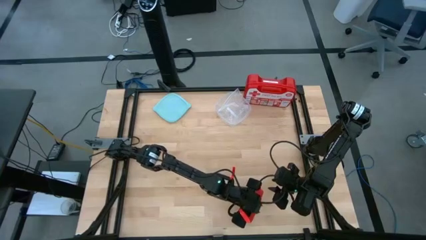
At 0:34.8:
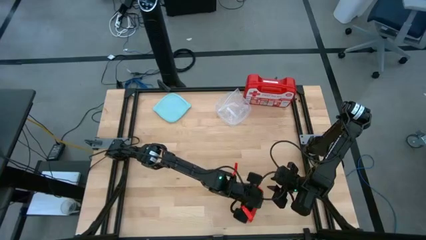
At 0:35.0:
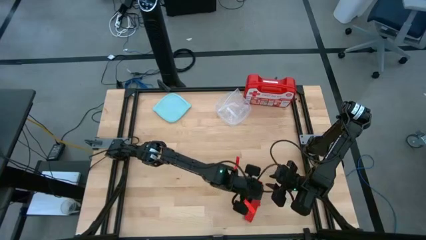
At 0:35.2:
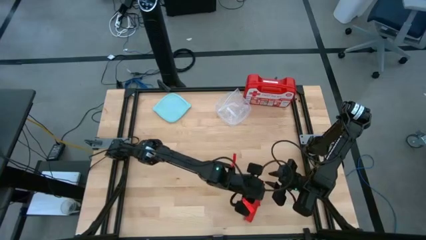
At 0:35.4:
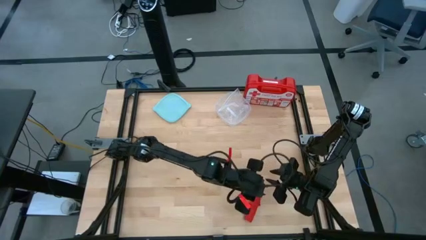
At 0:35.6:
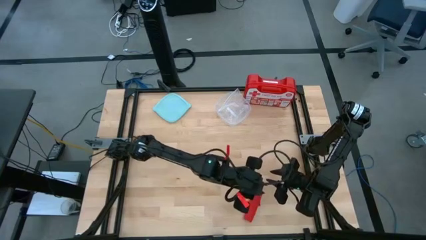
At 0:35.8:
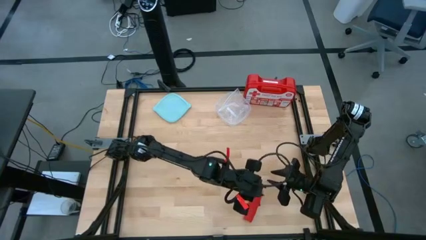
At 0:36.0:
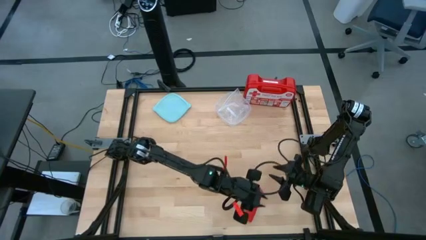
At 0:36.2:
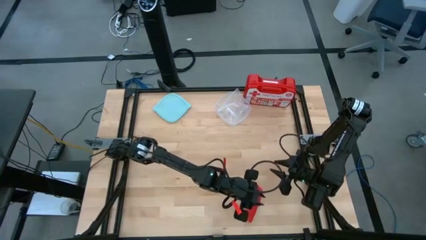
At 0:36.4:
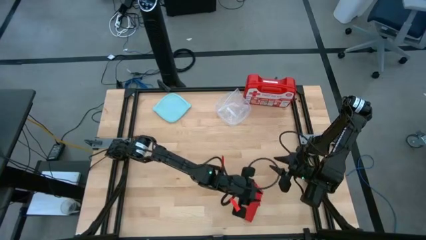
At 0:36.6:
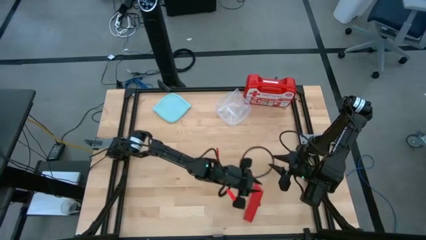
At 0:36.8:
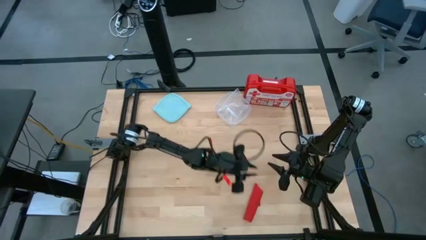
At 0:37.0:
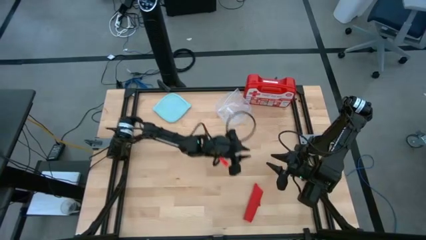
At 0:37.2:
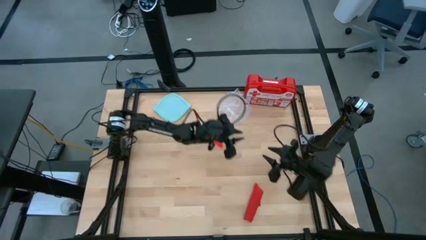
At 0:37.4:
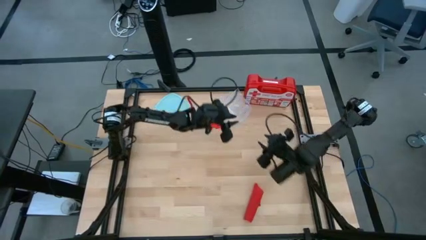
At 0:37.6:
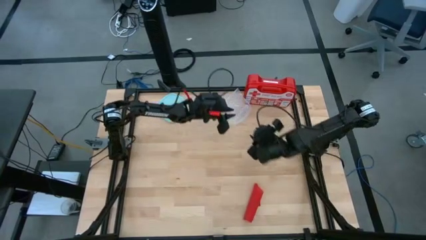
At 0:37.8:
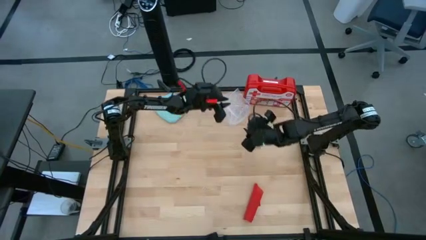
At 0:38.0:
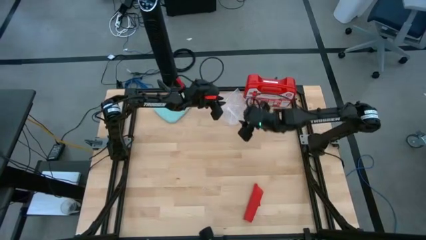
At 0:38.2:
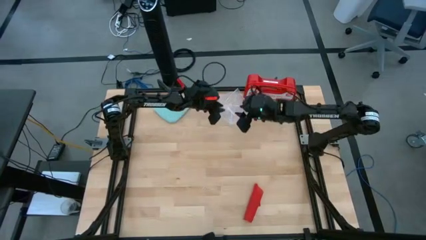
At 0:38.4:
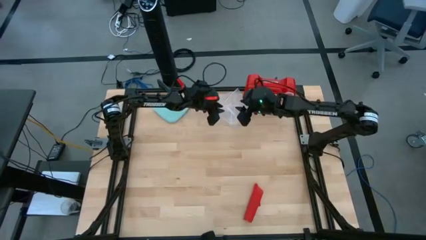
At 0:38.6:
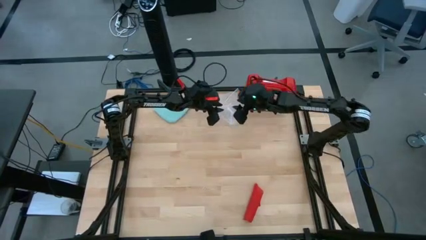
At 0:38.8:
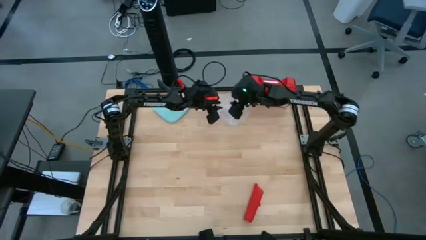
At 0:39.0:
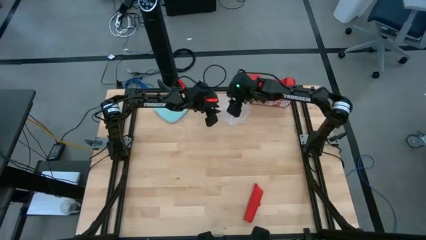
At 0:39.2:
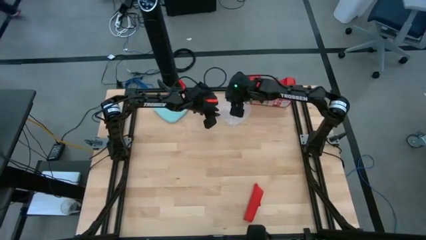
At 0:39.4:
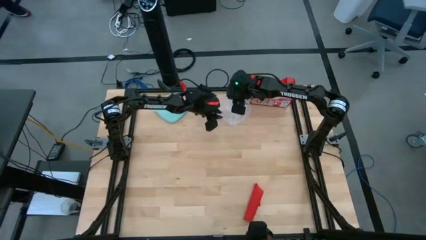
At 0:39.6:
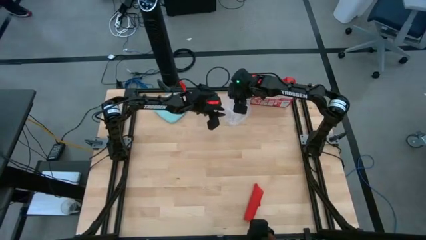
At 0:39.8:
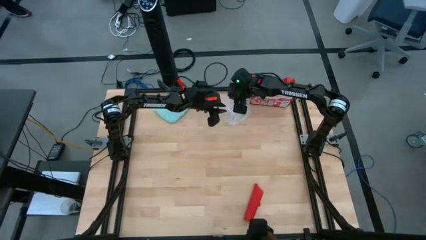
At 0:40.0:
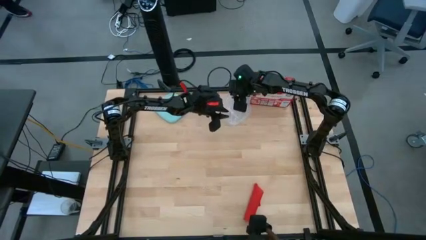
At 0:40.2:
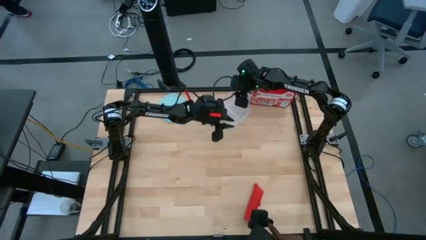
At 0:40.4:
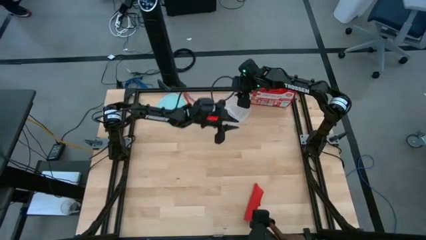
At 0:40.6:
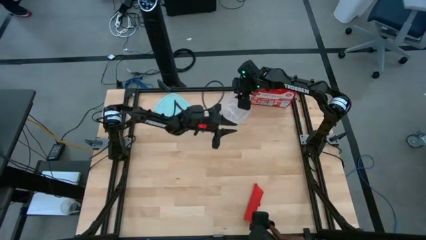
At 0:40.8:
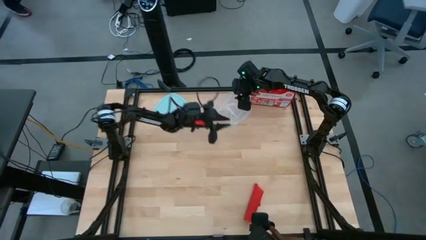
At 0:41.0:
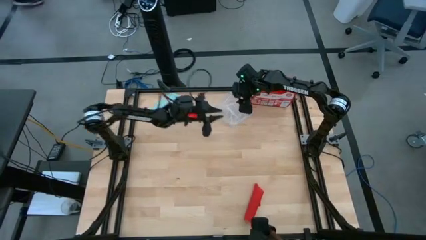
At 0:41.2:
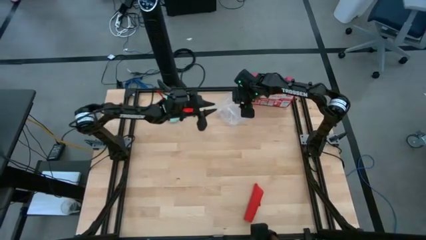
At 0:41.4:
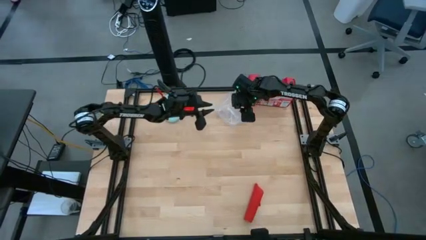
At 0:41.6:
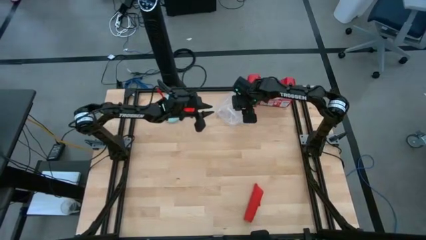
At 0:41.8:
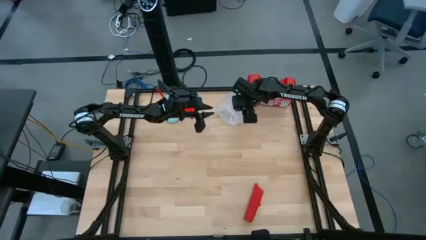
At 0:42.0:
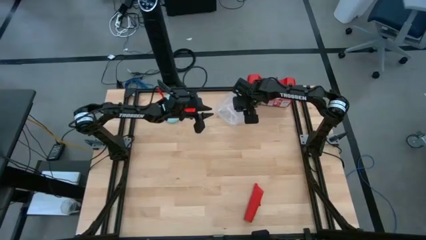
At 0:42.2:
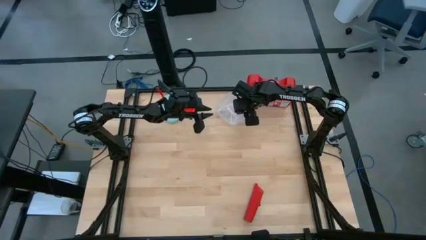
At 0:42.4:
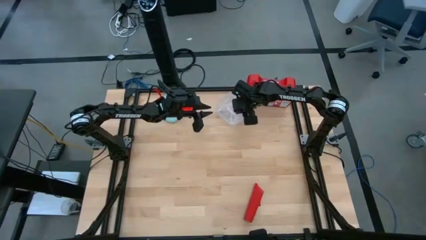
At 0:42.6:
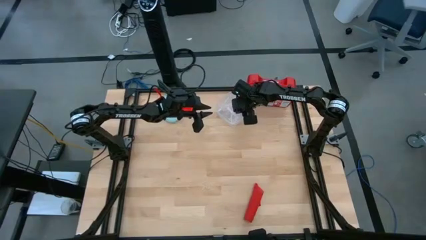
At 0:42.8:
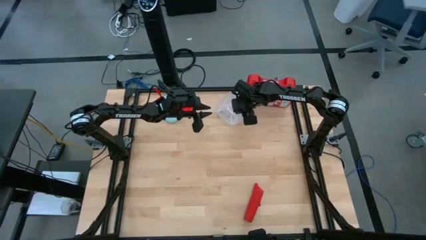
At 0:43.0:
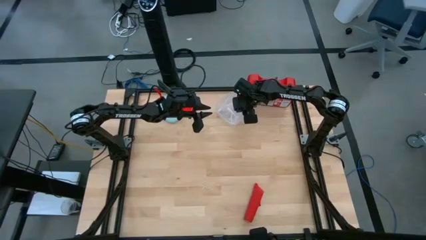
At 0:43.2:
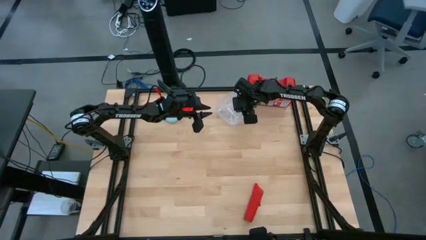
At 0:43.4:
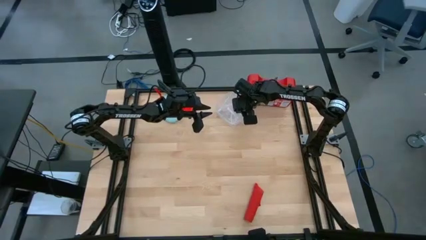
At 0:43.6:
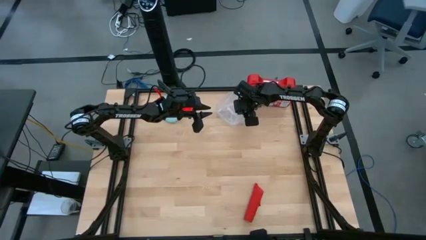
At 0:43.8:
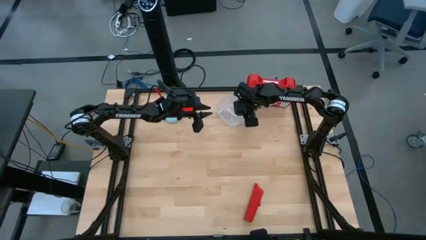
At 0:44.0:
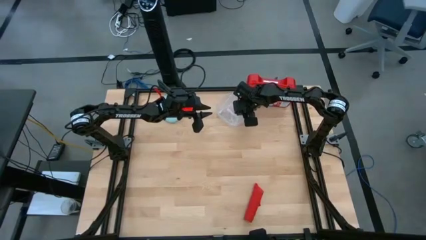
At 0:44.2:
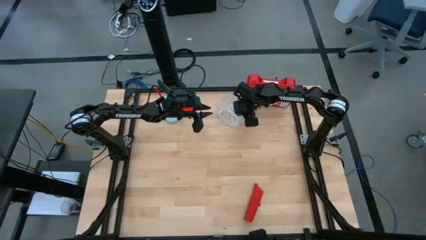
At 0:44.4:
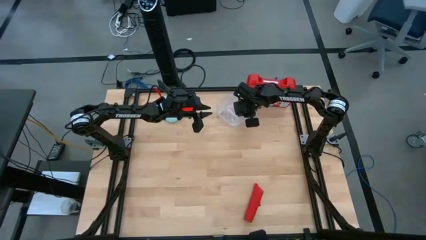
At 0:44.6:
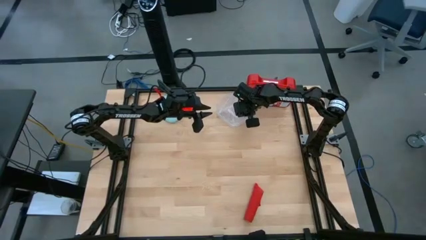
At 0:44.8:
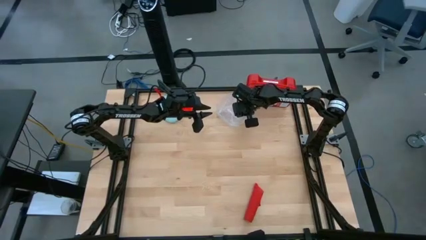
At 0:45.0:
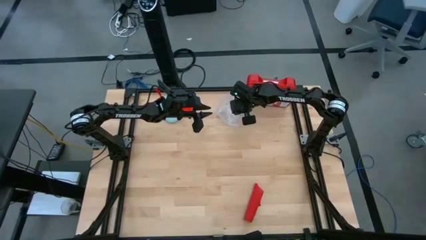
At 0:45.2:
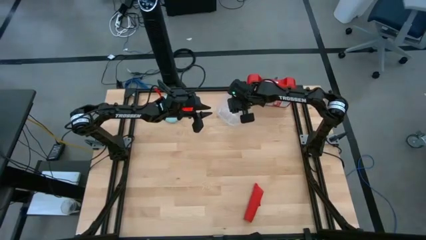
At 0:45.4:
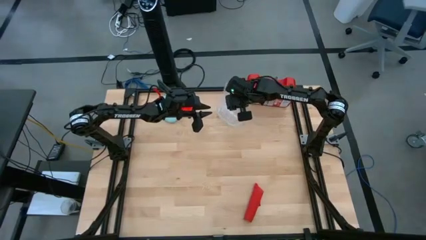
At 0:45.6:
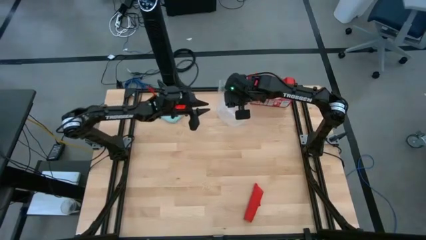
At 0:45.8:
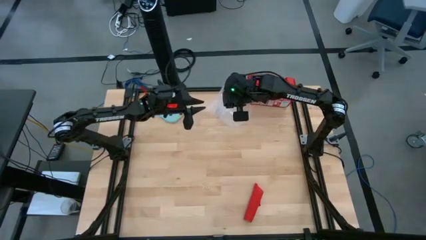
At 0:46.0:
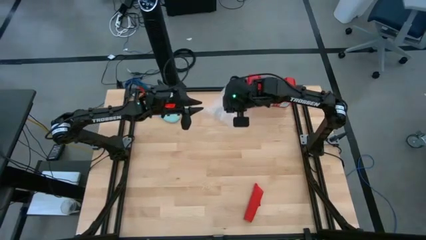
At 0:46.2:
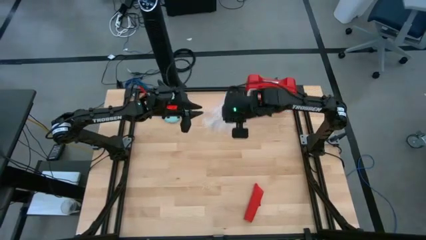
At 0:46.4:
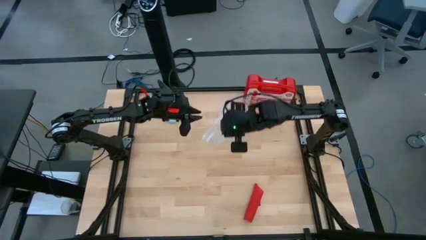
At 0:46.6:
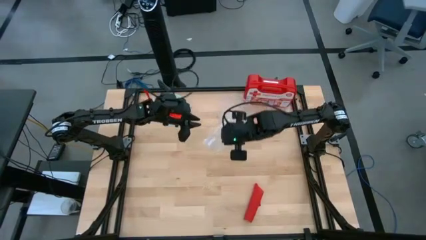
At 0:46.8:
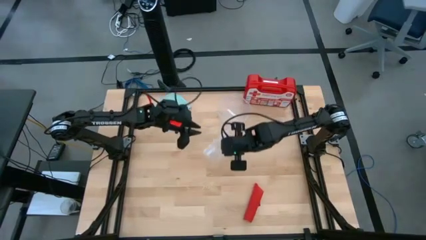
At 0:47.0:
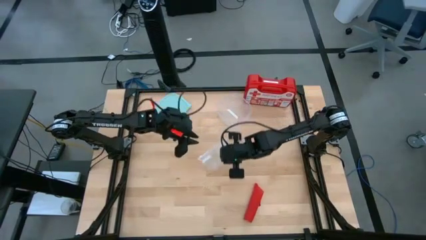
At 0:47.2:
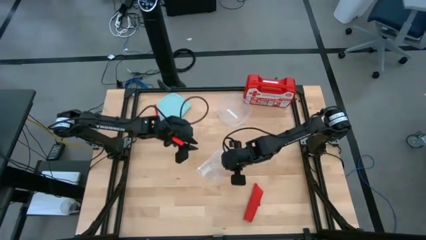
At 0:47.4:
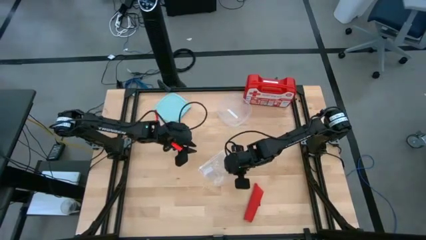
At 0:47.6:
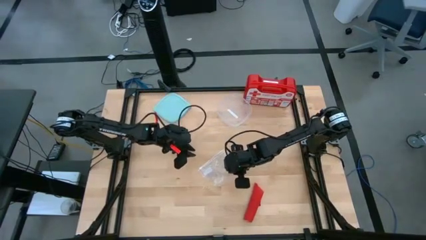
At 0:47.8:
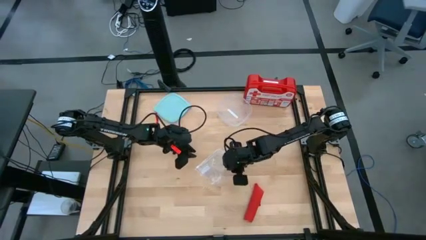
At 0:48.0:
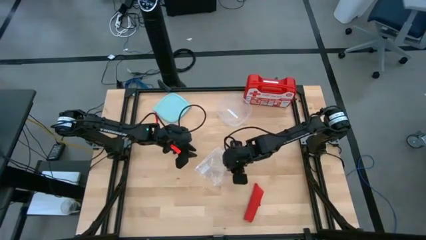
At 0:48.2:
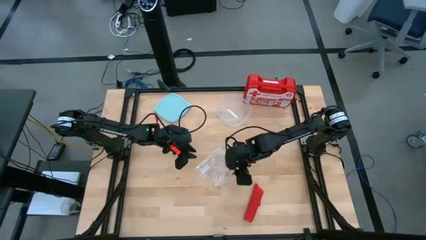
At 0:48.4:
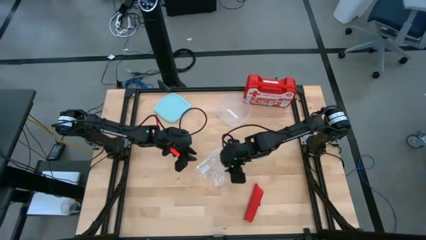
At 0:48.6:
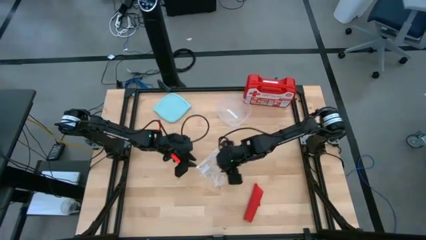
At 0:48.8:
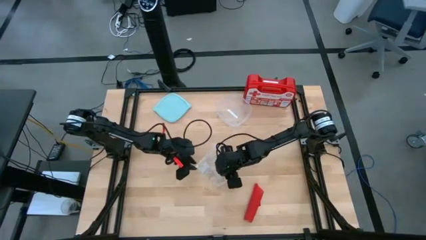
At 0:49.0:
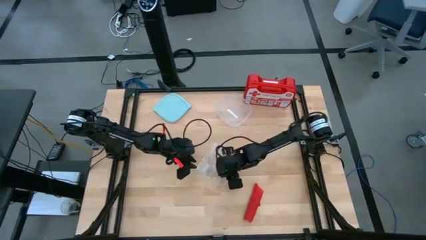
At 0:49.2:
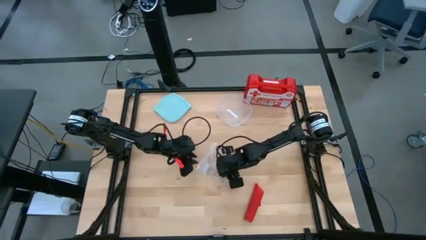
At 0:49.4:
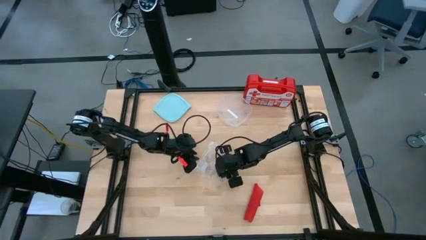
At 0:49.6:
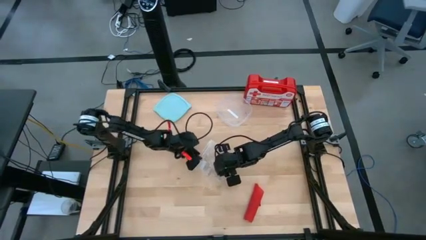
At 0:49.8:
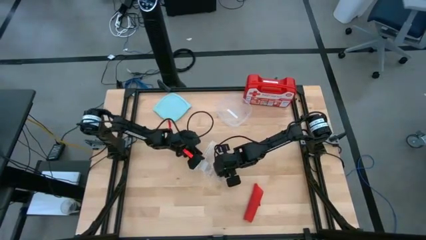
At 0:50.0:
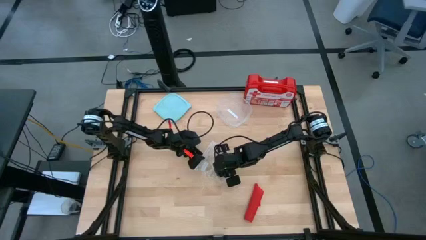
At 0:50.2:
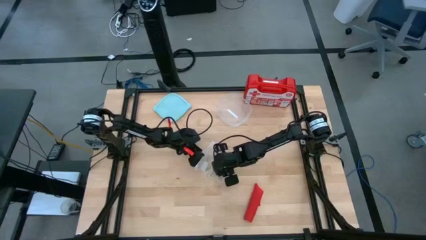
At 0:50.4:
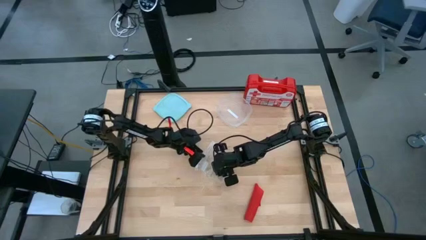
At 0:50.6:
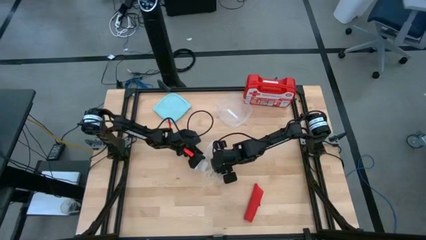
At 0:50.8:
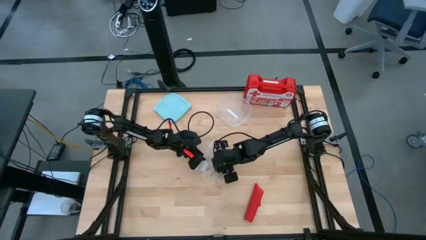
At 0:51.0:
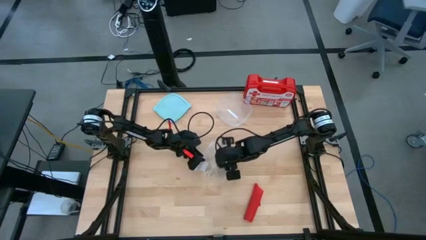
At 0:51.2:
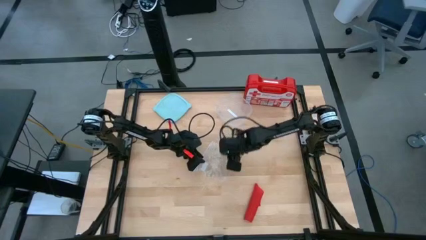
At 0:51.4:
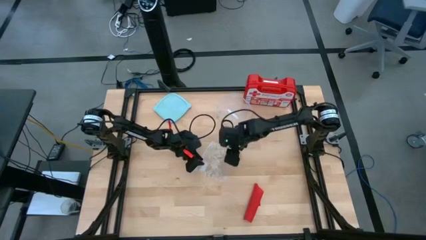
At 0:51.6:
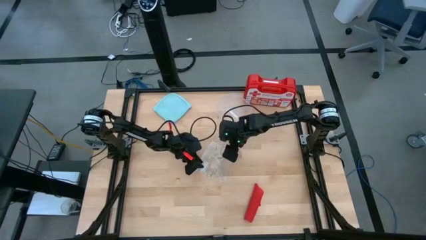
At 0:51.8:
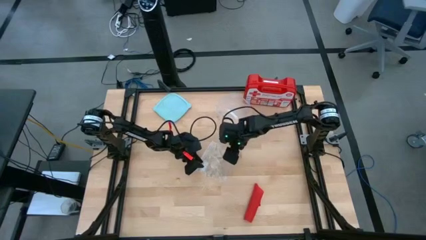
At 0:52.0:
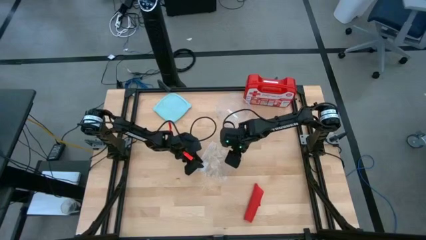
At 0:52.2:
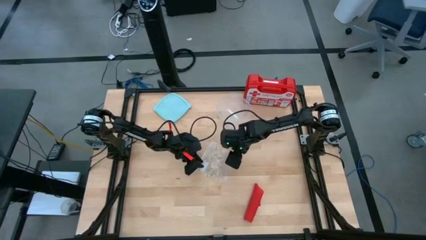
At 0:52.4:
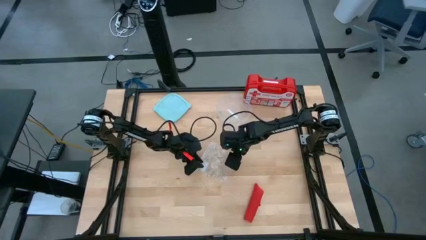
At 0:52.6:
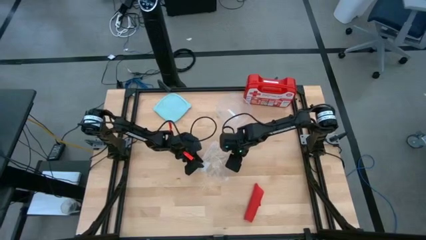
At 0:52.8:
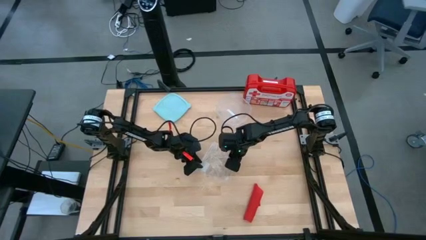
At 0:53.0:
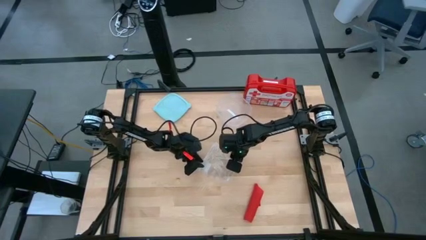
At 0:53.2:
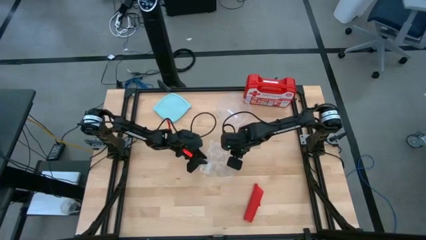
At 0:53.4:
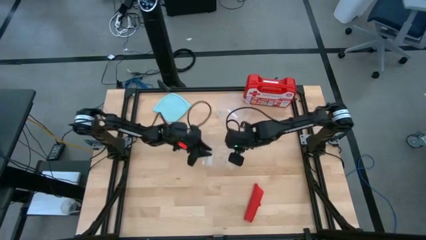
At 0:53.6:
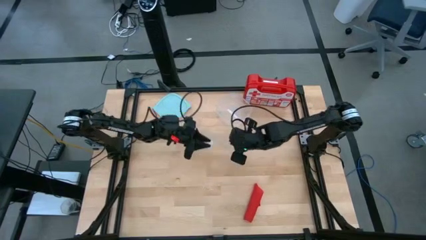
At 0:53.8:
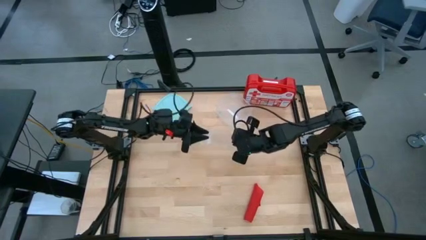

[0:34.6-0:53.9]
Task: Roll bandage
Open the transparent zip bag
